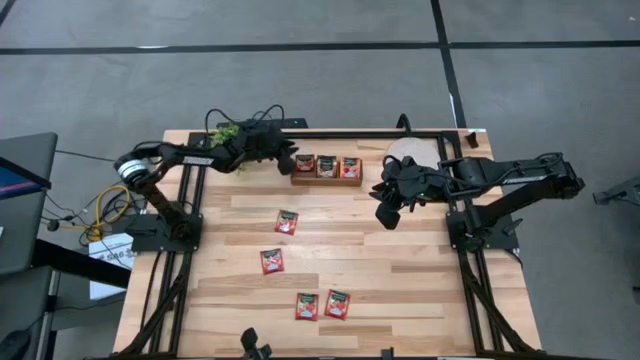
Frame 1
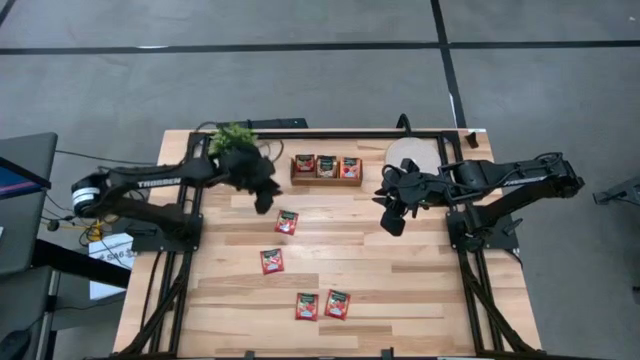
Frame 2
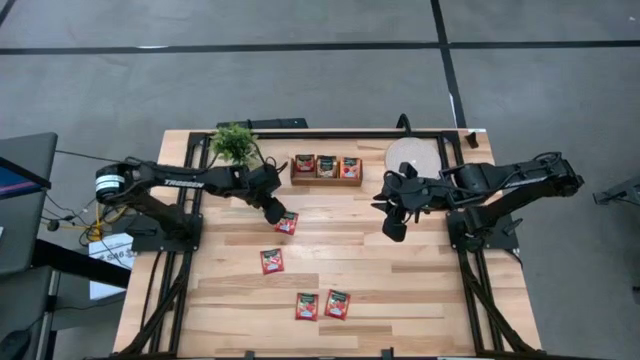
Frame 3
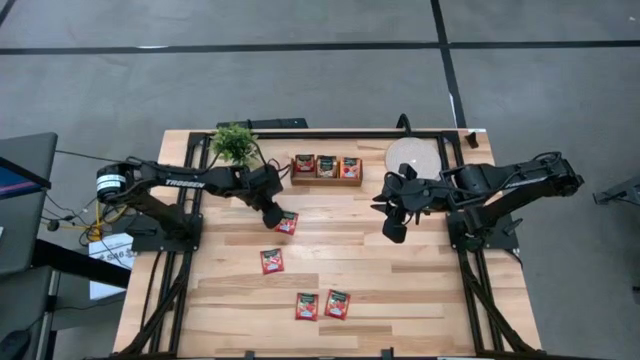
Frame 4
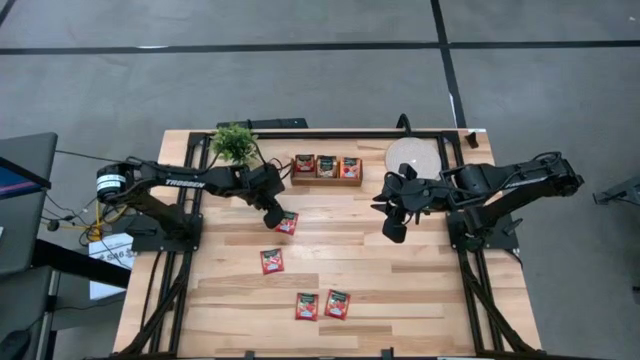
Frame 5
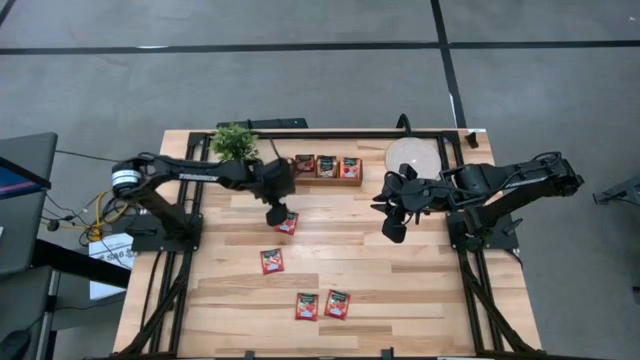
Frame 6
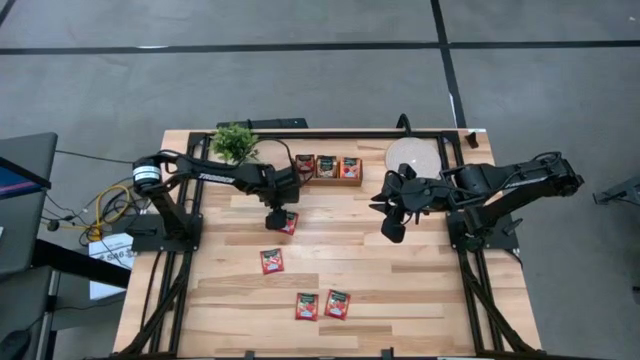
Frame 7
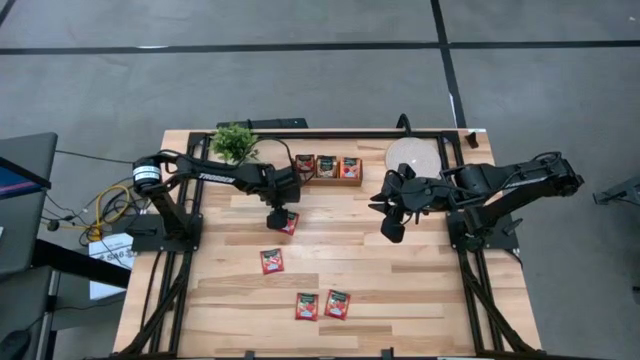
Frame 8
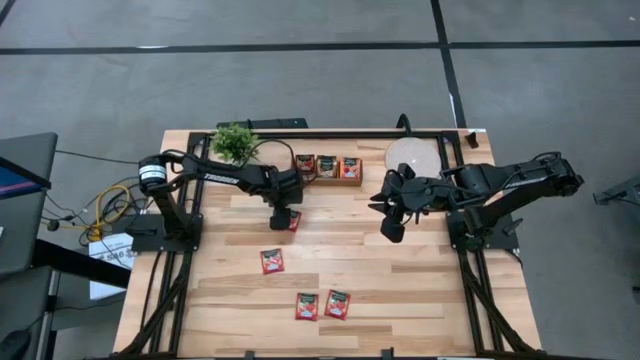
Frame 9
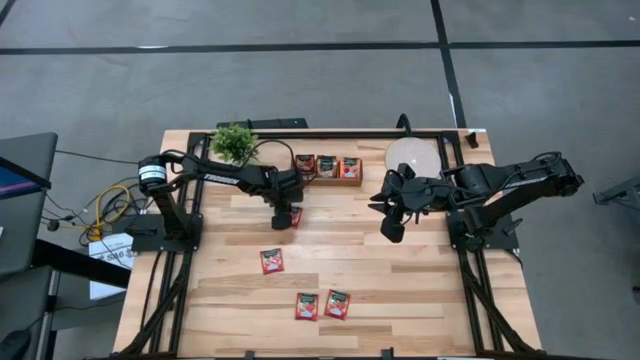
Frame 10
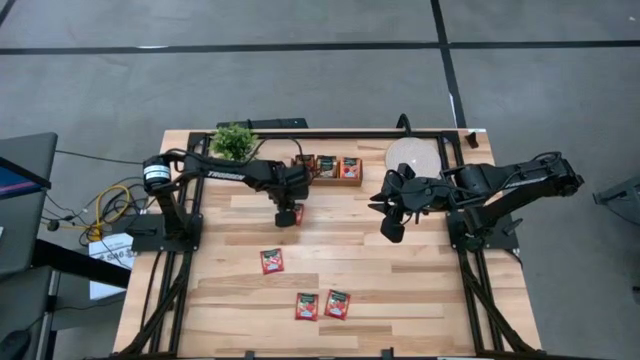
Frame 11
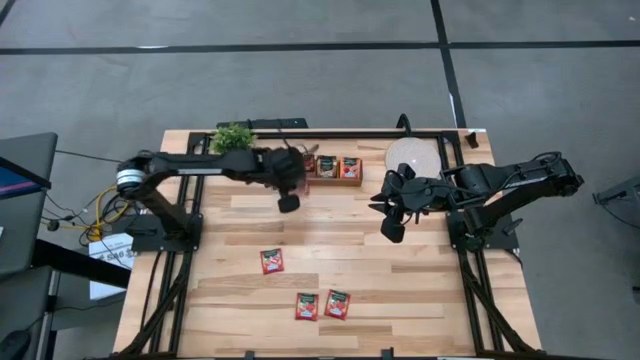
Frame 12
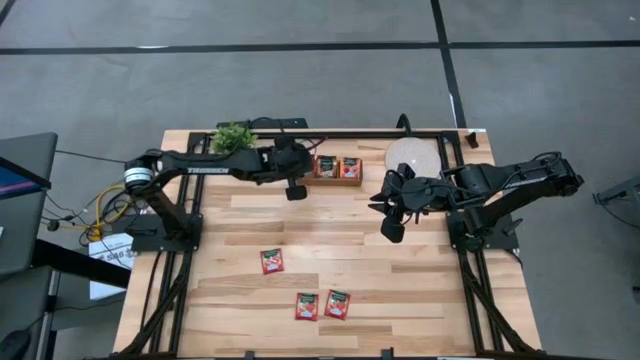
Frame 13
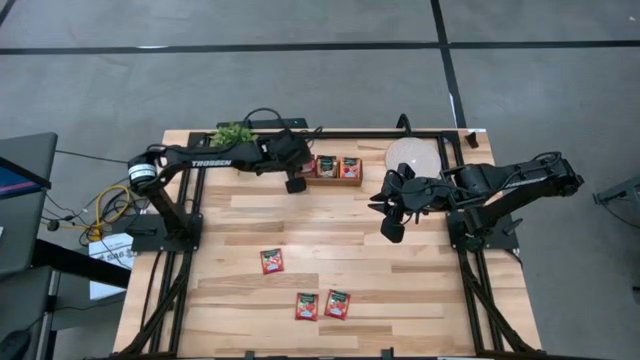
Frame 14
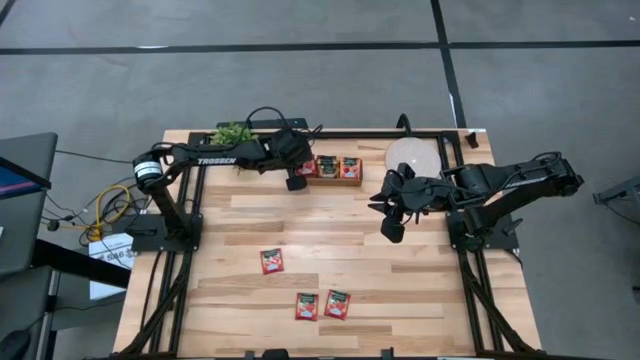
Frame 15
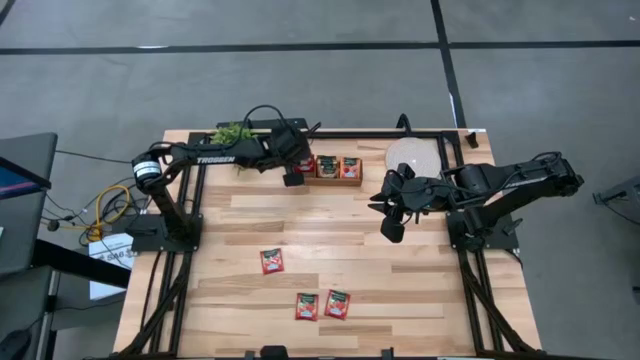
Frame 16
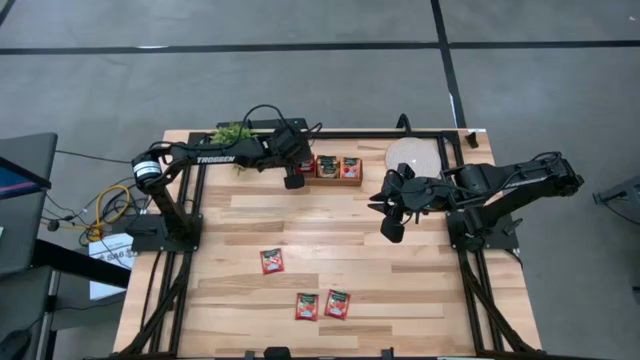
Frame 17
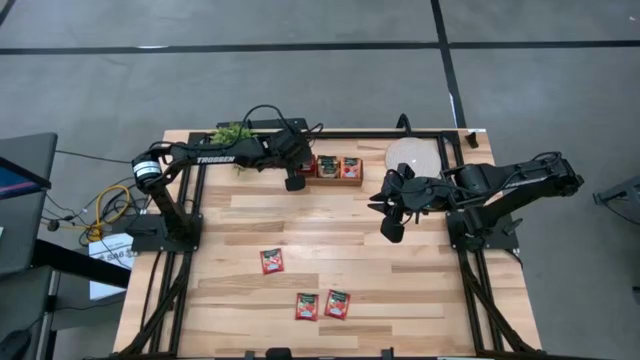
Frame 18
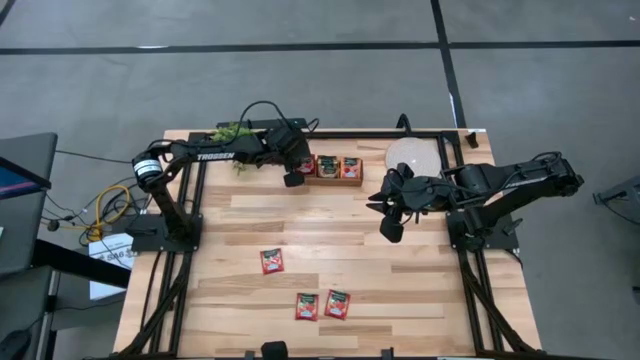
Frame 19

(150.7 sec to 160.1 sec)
Task: Pick & Place Tea
Put the red tea bag into the left section of the wooden organizer

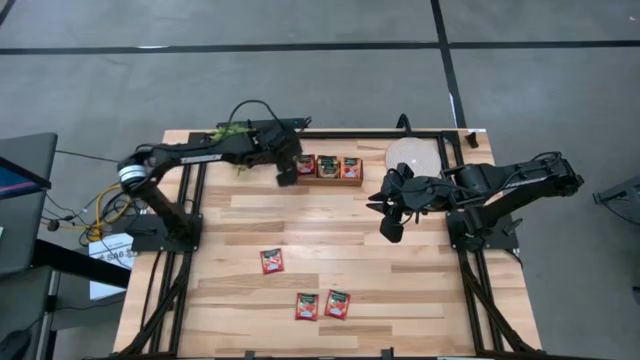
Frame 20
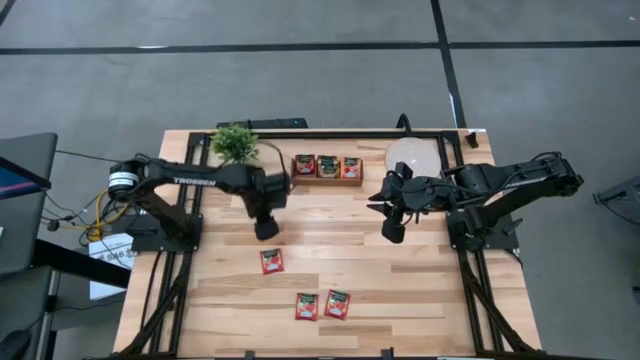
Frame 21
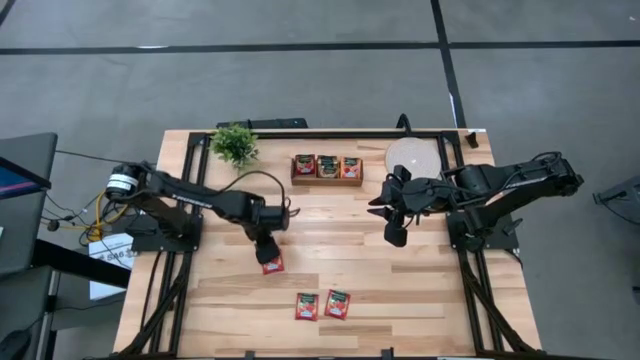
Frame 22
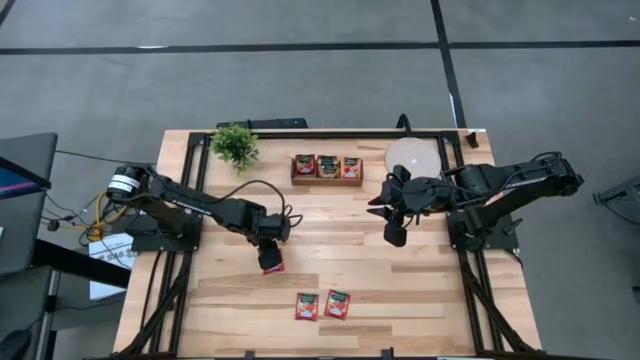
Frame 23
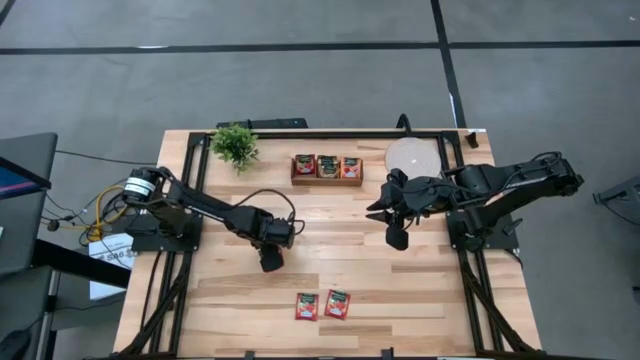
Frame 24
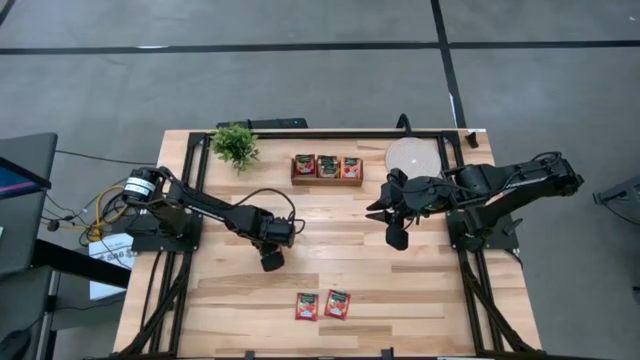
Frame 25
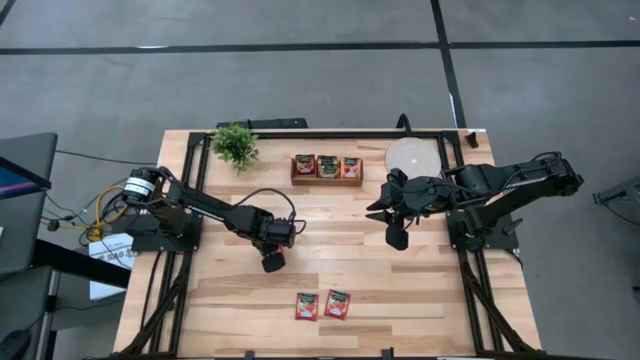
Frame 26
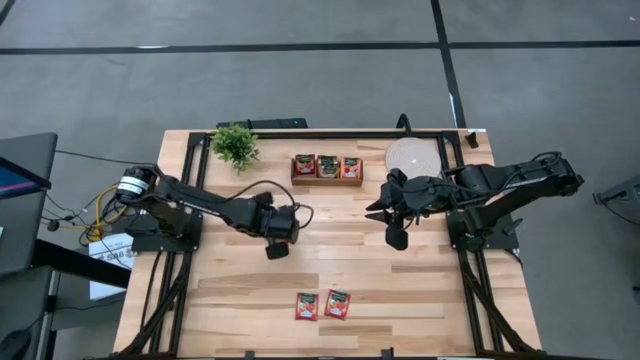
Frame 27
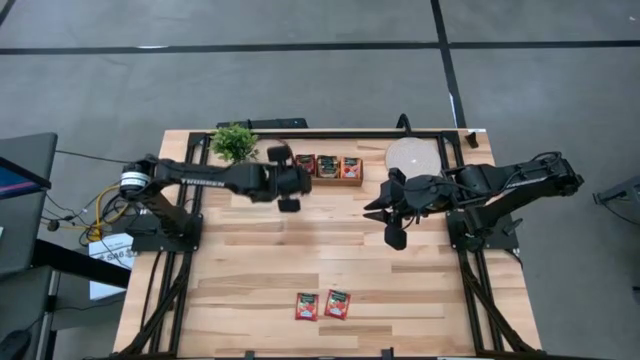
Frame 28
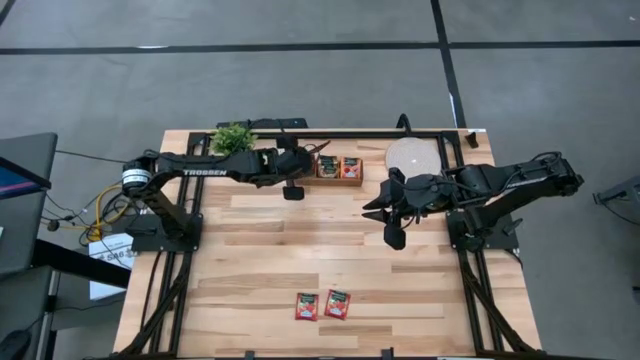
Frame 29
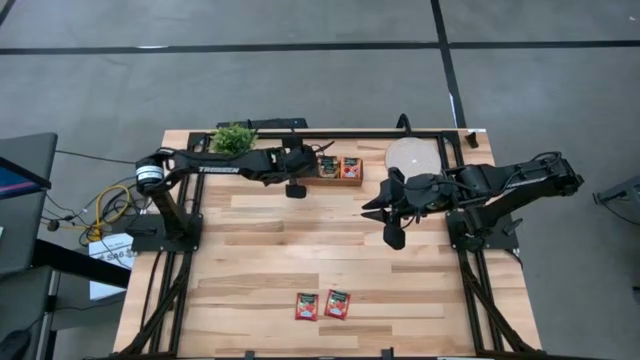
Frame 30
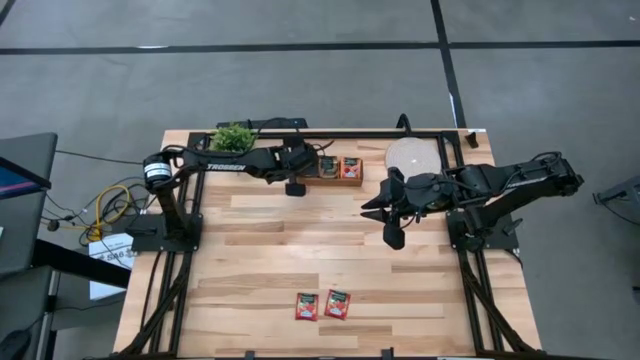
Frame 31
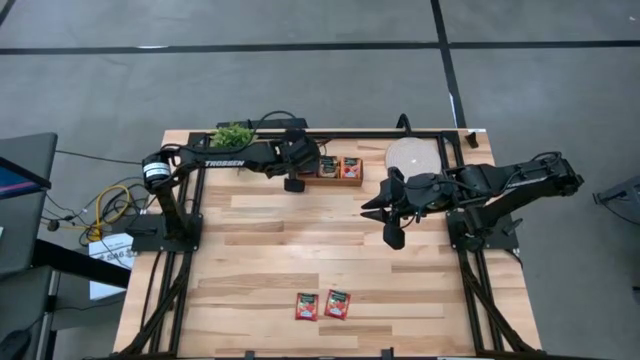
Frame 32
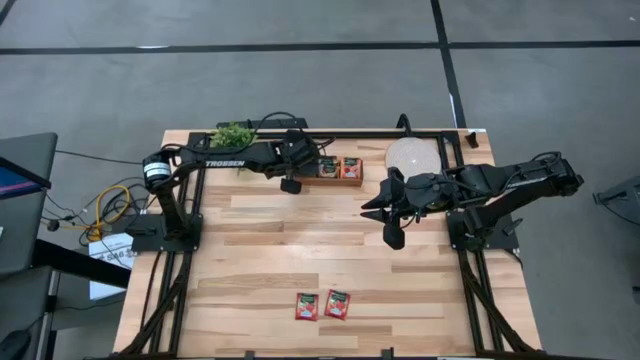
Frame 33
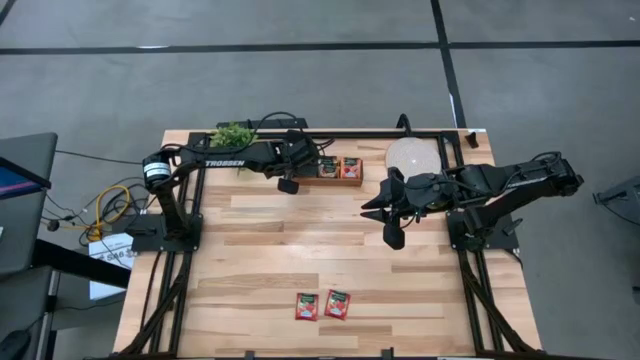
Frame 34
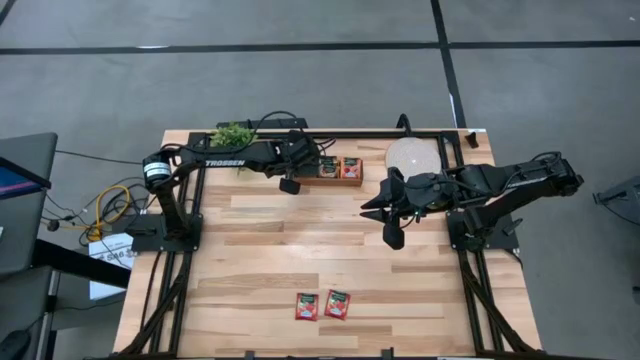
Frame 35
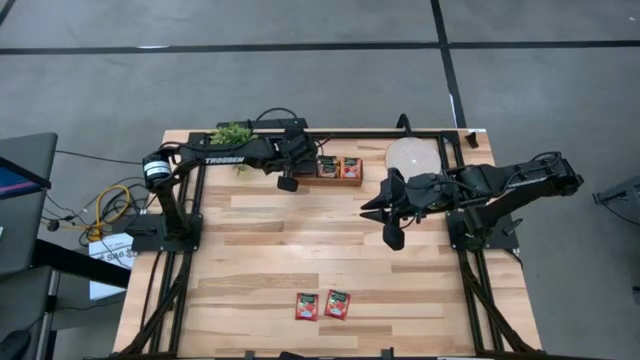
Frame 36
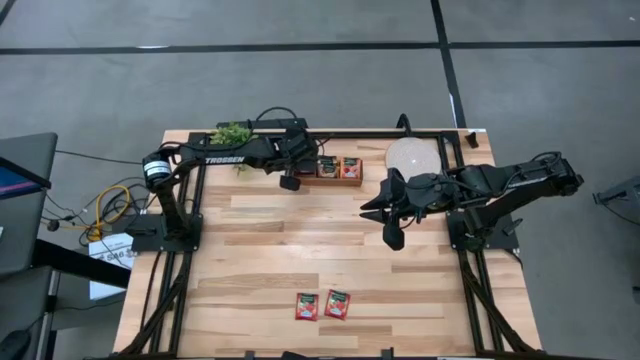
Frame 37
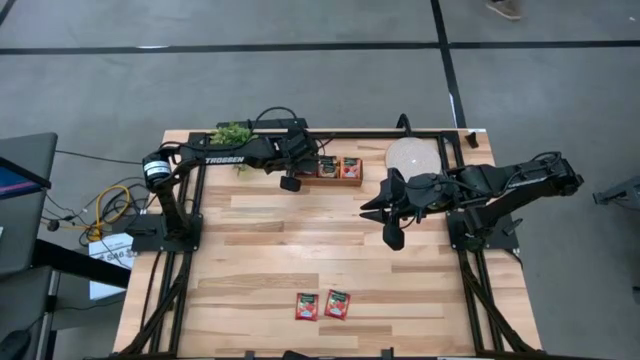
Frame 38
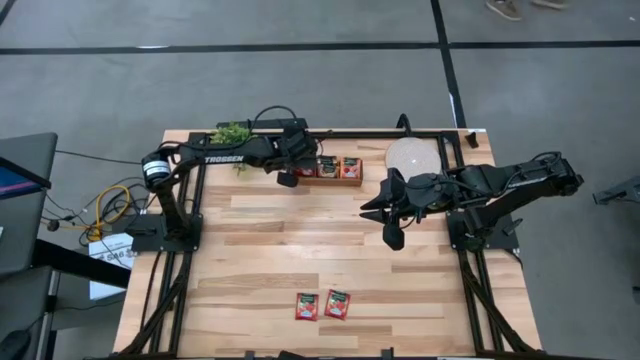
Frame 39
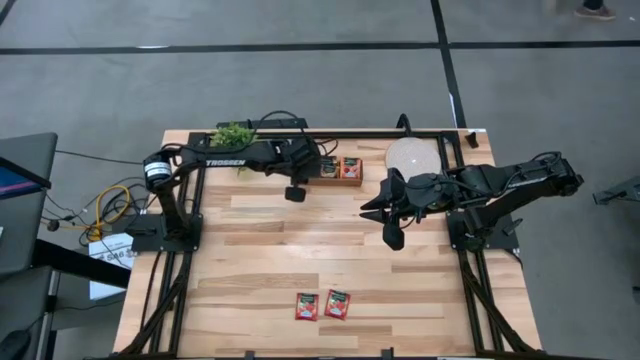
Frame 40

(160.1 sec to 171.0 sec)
Put the left red tea bag into the left section of the wooden organizer
